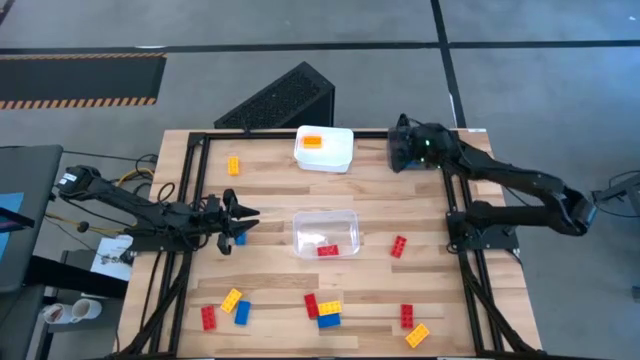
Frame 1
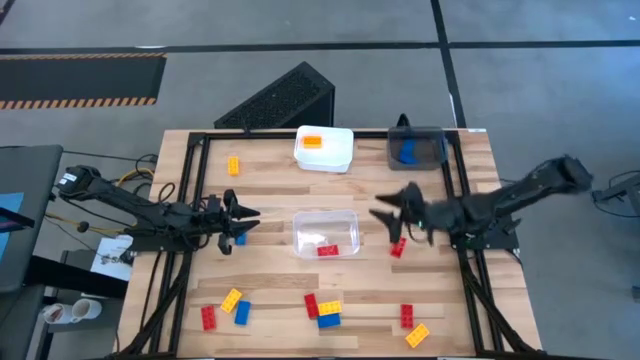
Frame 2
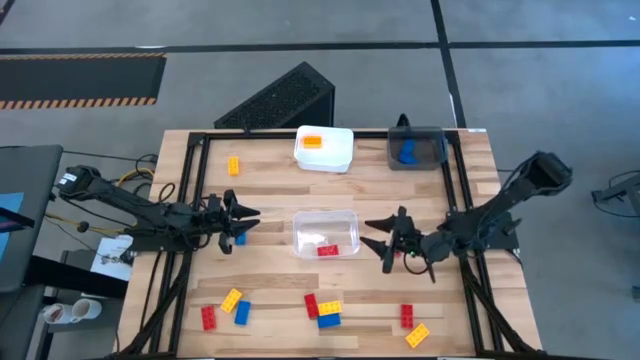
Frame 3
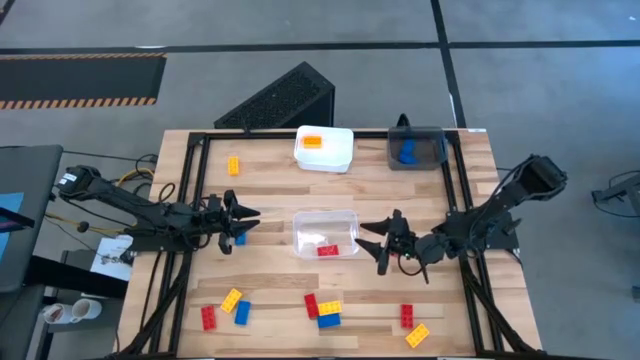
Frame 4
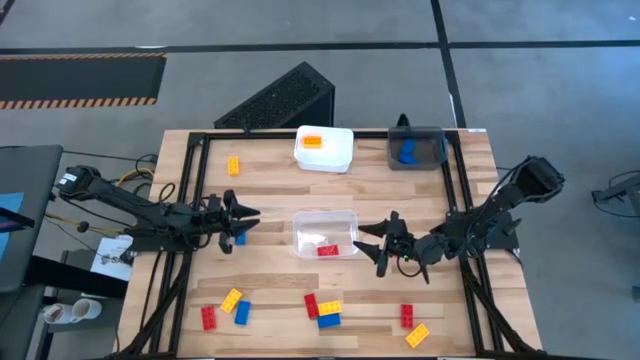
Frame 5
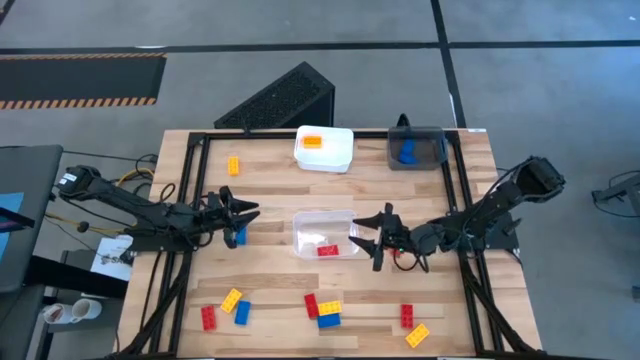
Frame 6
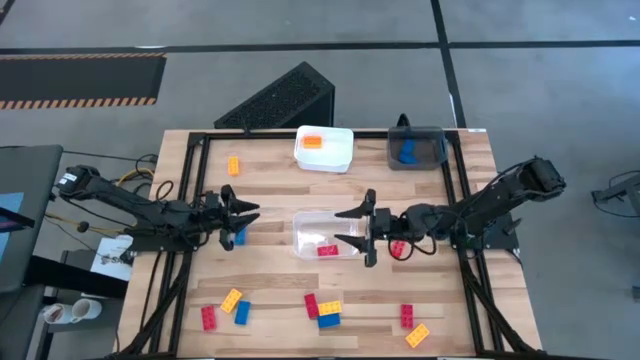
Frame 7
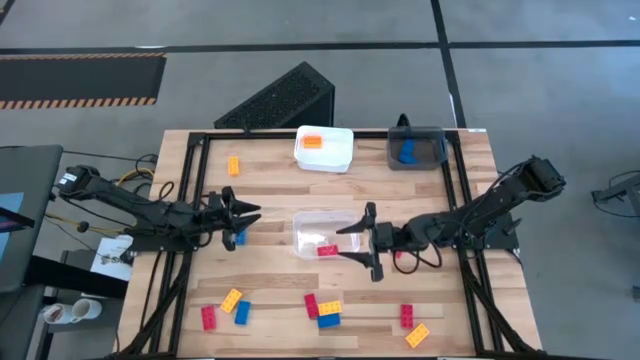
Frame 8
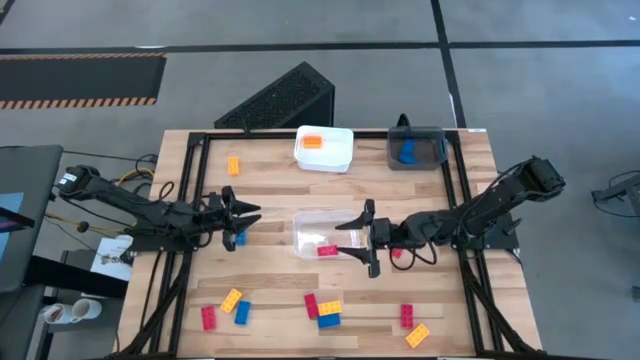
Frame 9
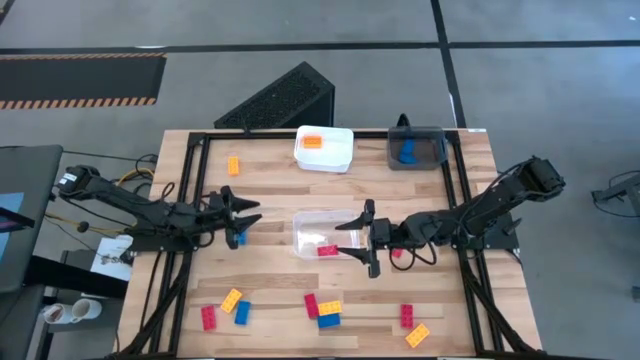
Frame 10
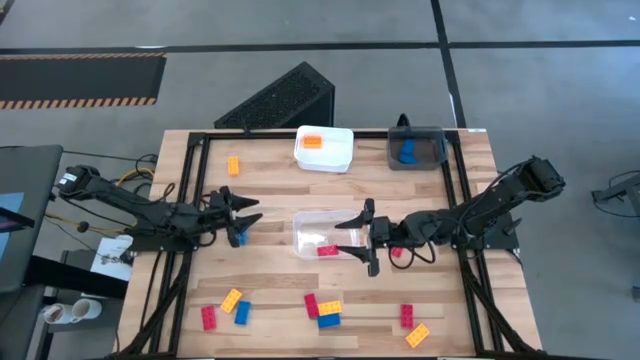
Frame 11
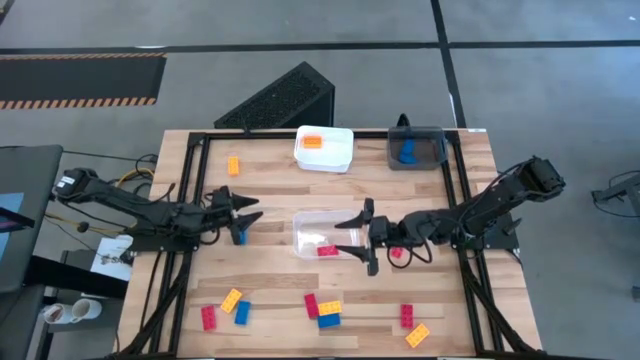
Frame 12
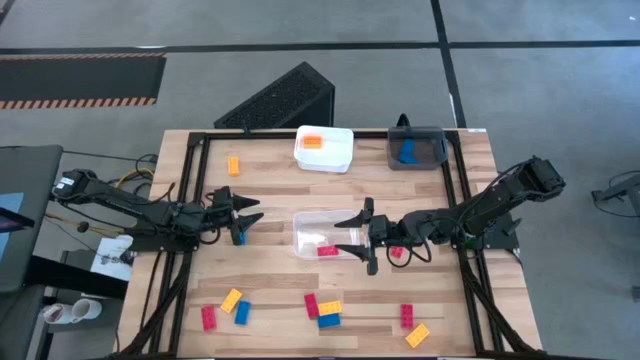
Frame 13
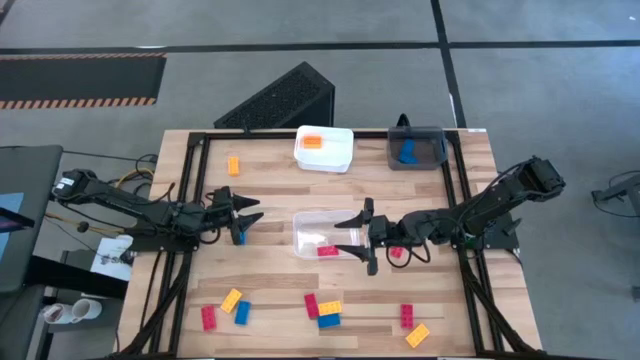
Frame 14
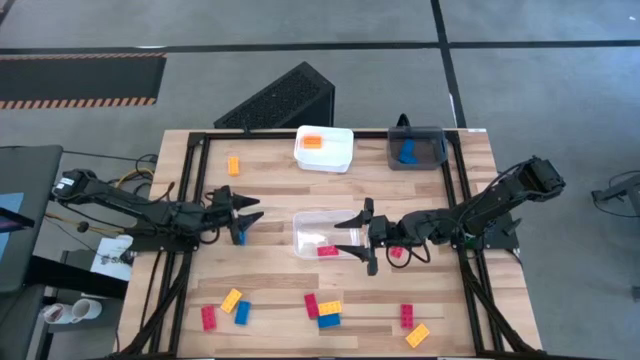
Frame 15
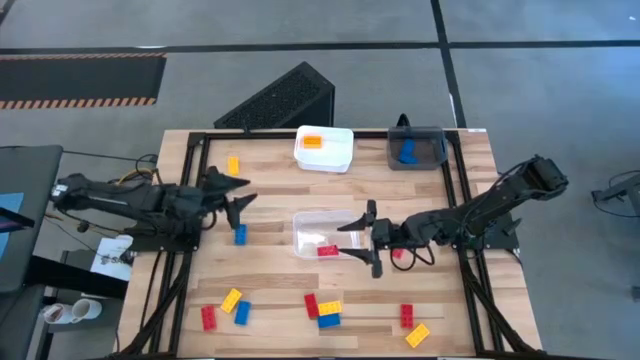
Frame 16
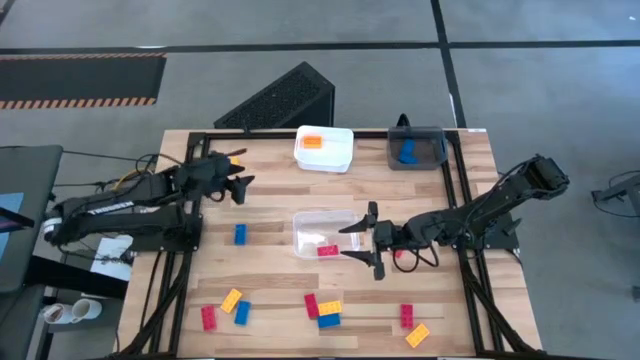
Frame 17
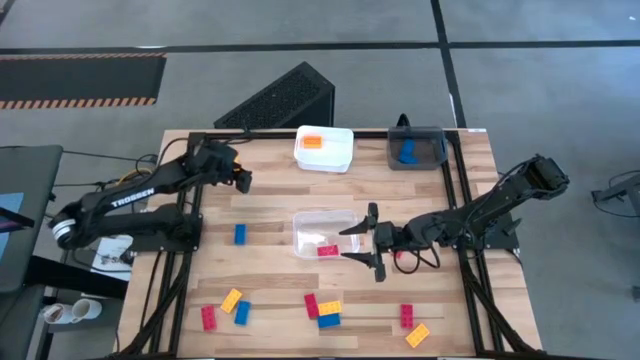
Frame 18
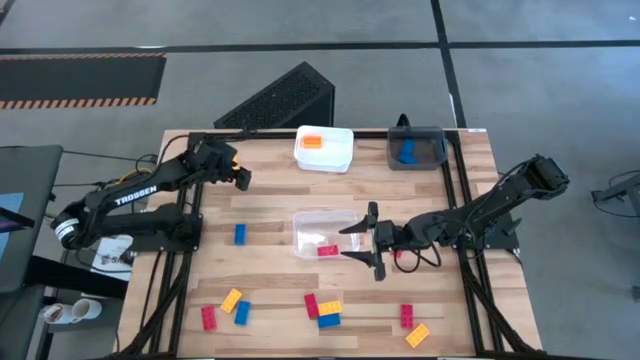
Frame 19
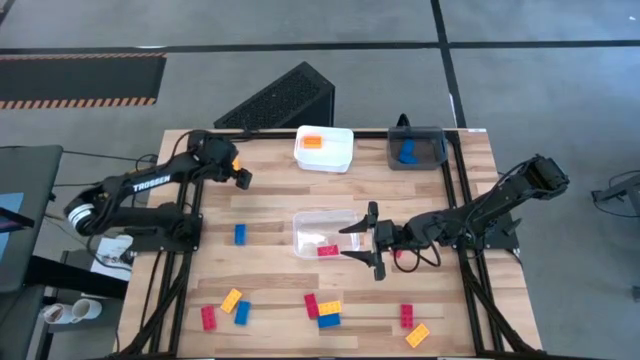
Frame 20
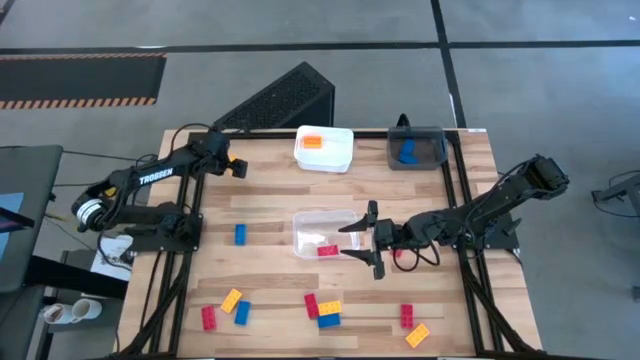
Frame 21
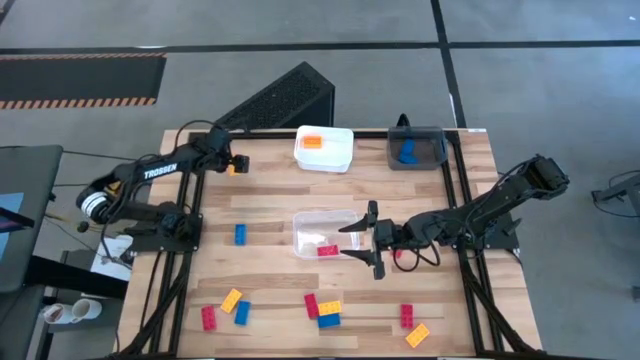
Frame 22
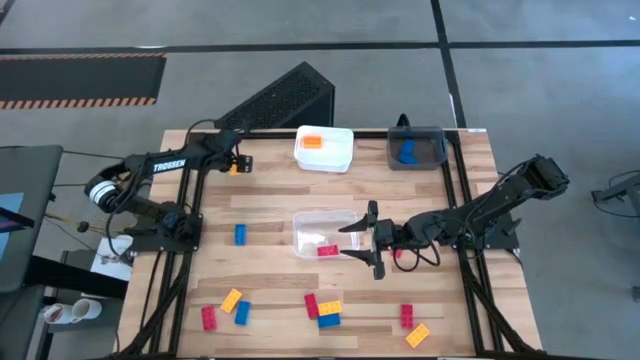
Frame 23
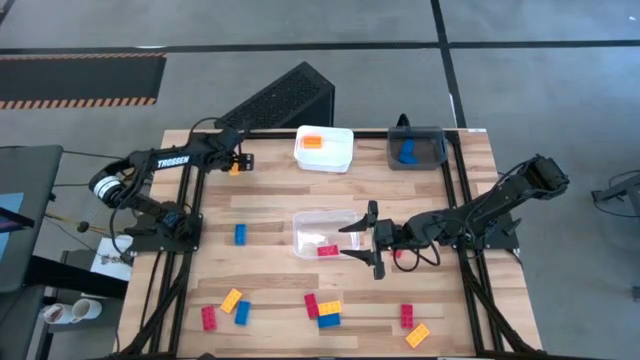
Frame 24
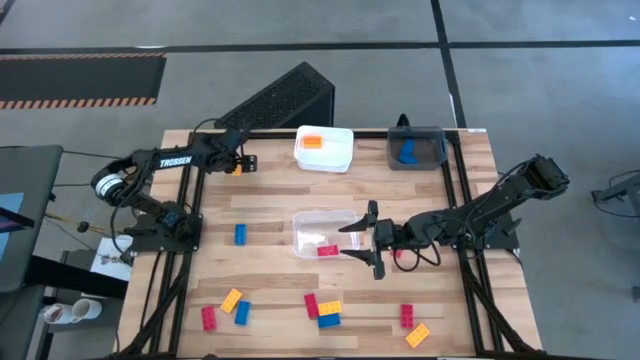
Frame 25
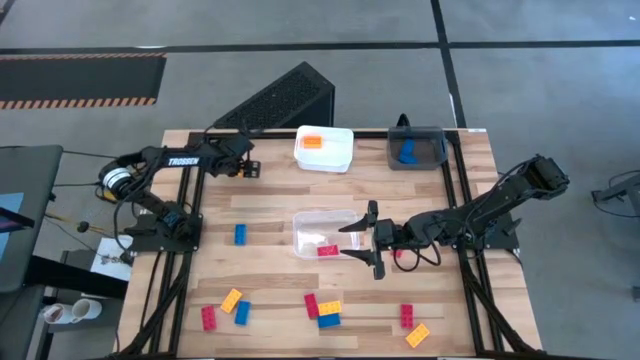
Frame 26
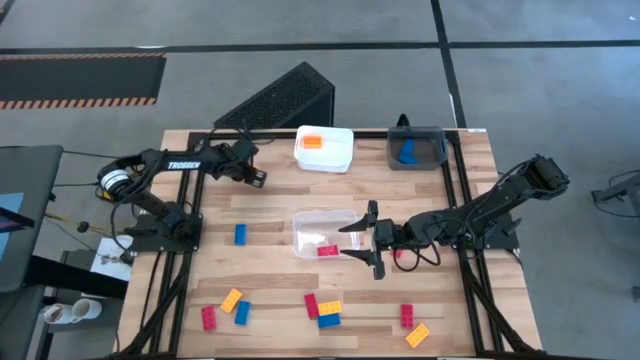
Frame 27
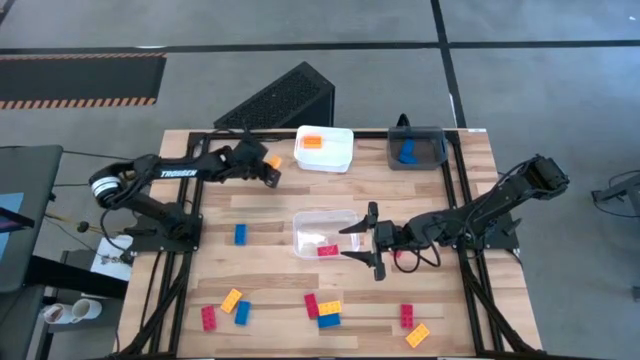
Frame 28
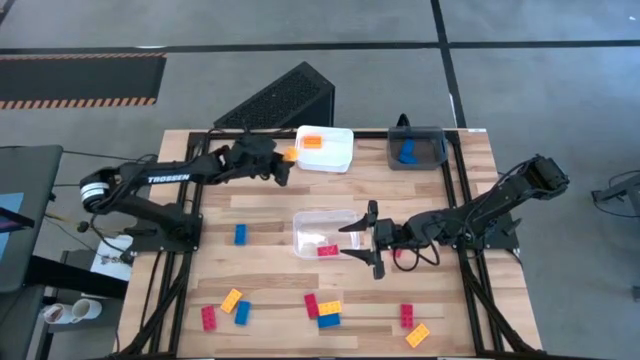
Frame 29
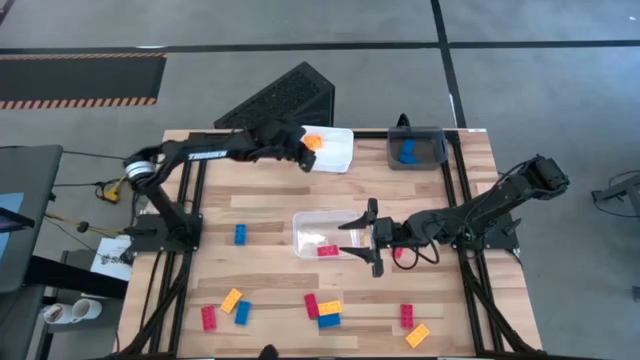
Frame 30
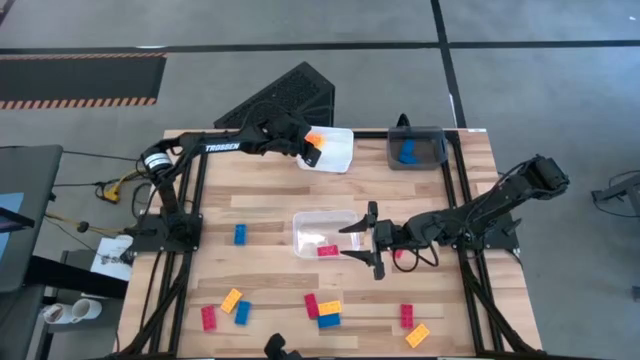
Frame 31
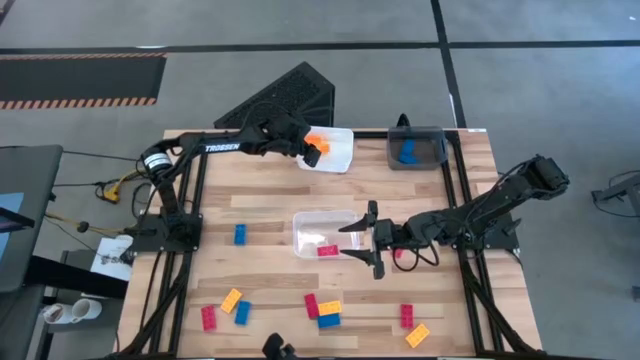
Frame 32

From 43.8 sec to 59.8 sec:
Task: Sort & place blocks by color
Put the yellow game piece into the white bin

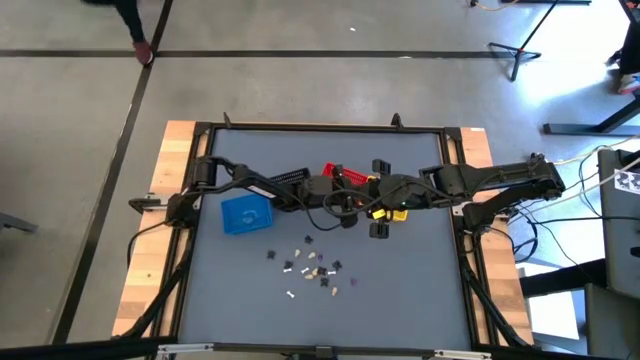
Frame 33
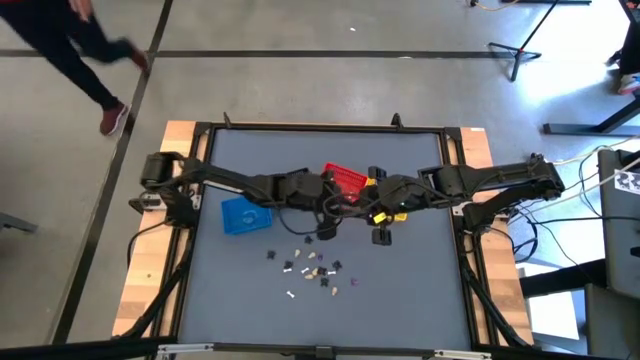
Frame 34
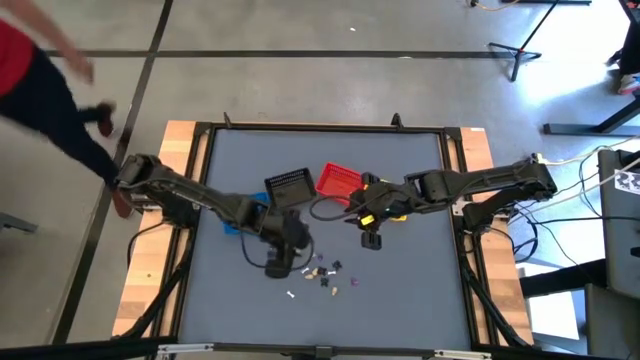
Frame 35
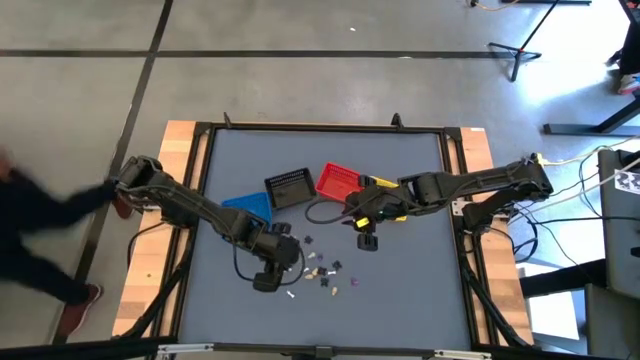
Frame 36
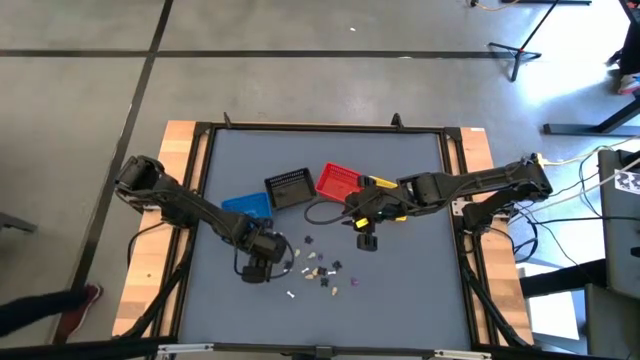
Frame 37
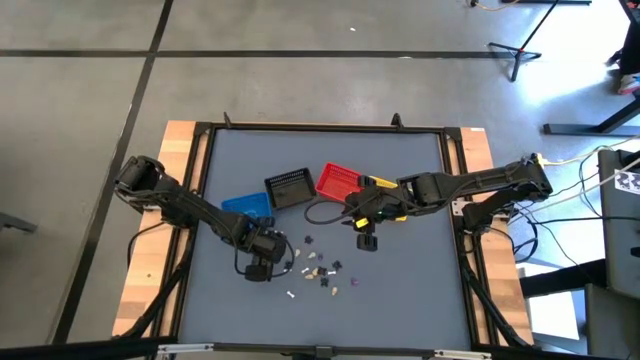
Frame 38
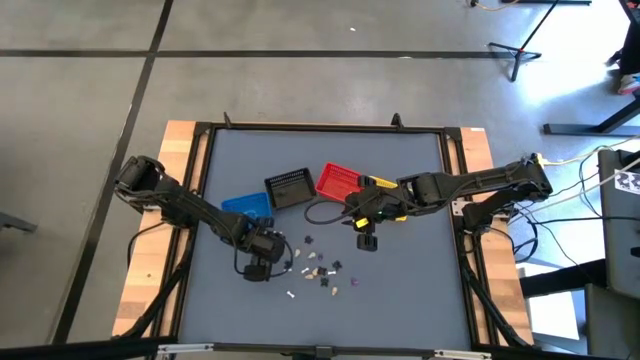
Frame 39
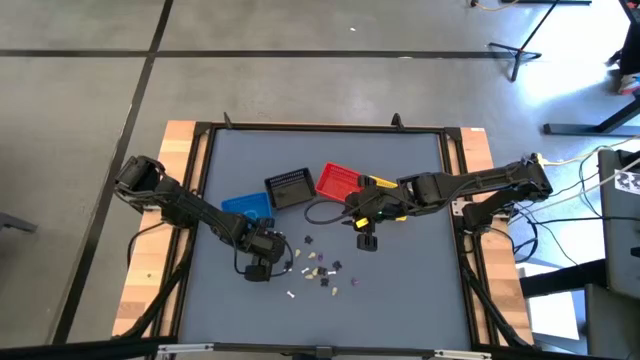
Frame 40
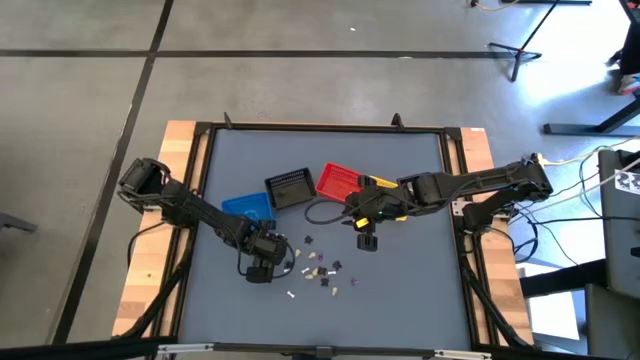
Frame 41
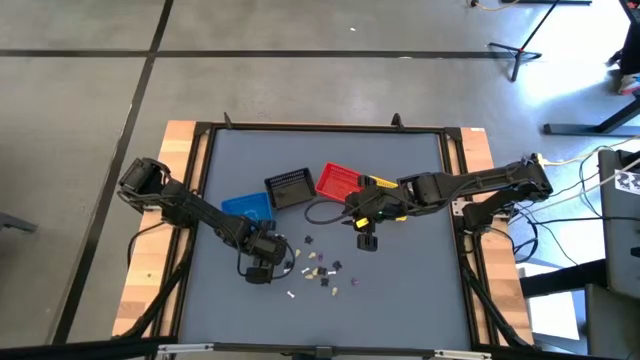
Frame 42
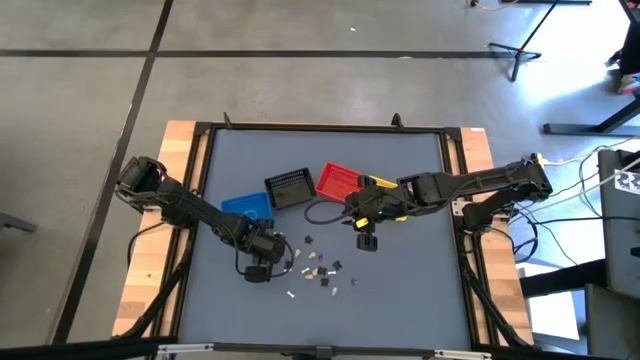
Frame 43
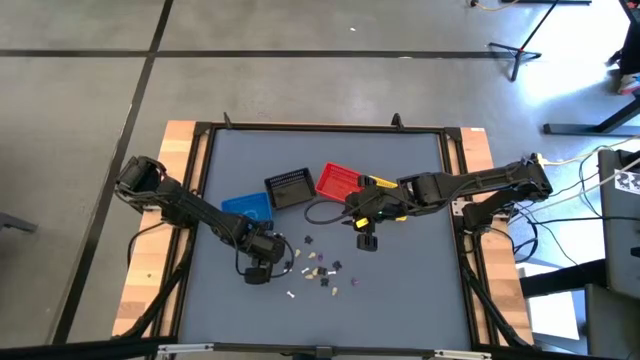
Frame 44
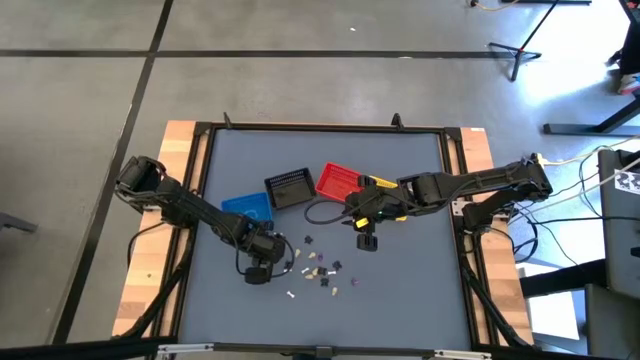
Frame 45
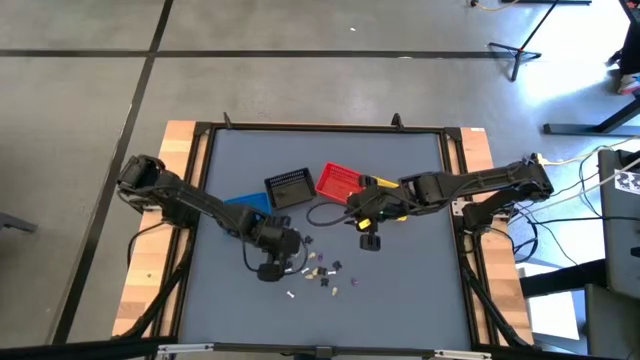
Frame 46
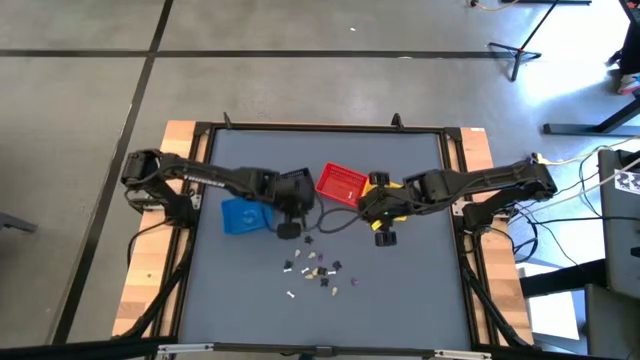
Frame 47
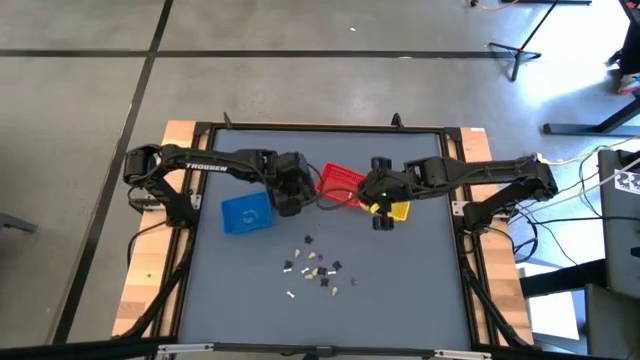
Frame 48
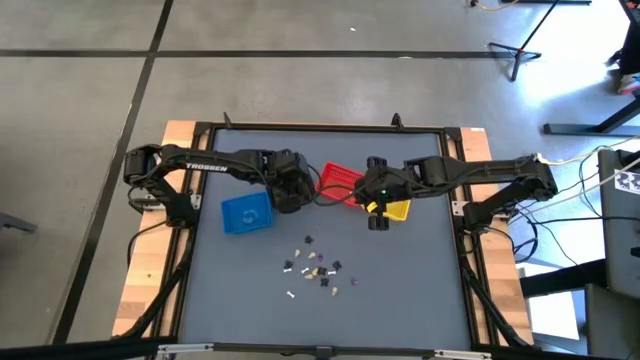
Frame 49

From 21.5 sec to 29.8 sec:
Task: Sort Halloween decoration
Put the black spider toy into the black bin
